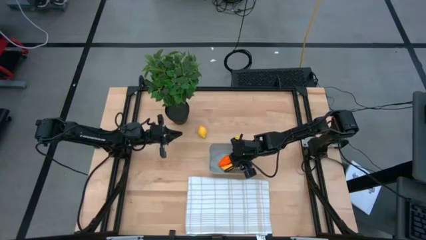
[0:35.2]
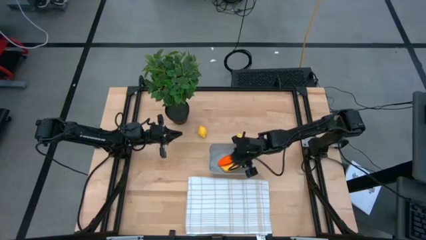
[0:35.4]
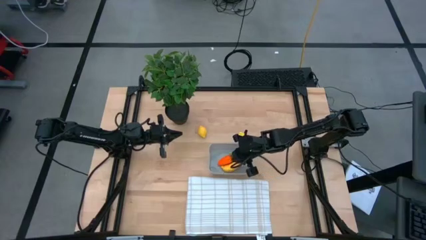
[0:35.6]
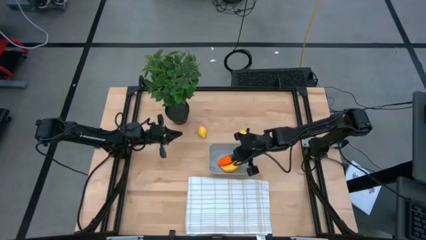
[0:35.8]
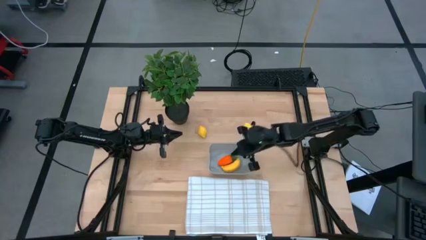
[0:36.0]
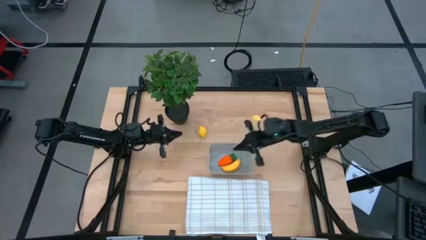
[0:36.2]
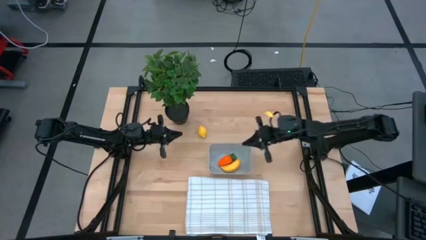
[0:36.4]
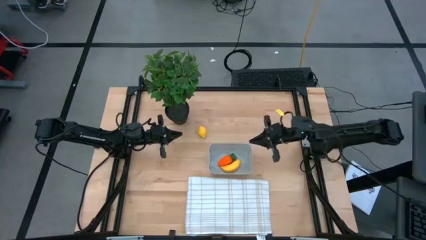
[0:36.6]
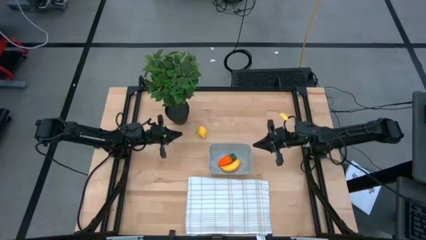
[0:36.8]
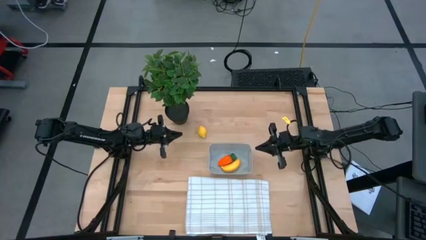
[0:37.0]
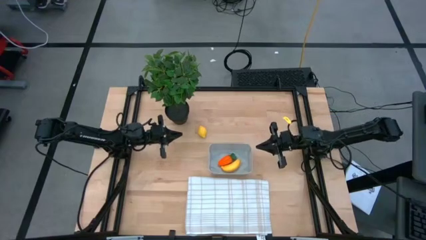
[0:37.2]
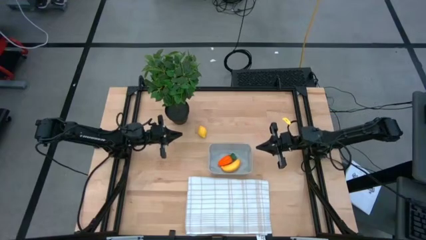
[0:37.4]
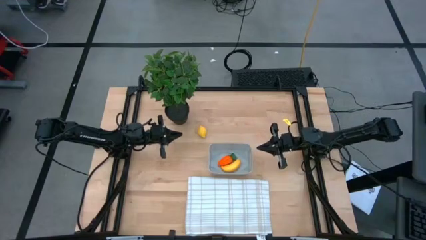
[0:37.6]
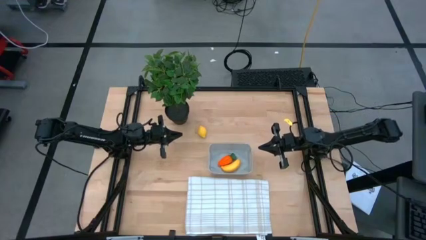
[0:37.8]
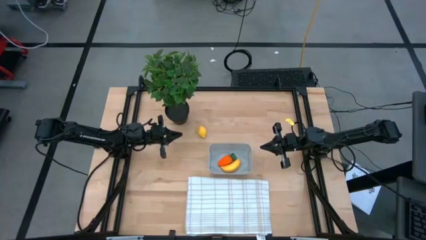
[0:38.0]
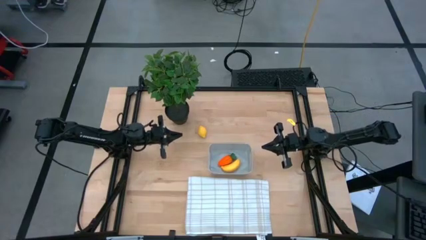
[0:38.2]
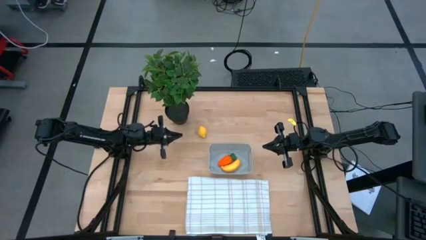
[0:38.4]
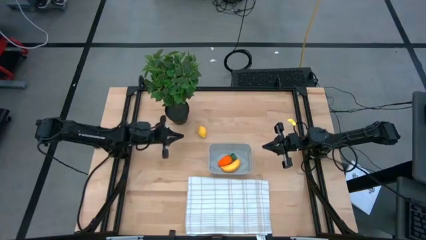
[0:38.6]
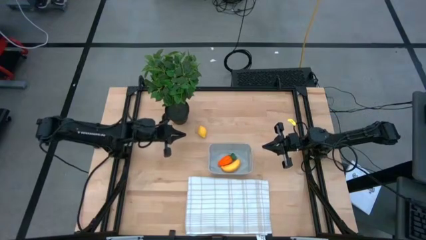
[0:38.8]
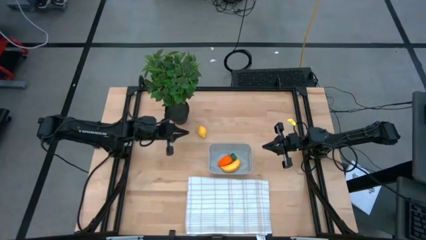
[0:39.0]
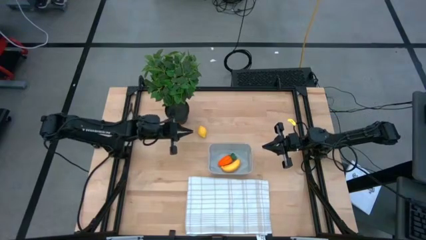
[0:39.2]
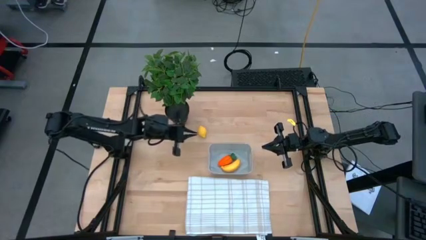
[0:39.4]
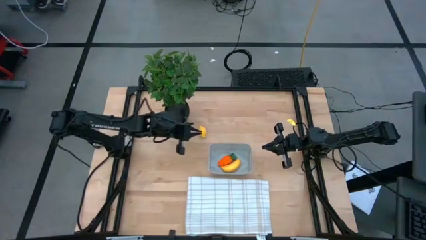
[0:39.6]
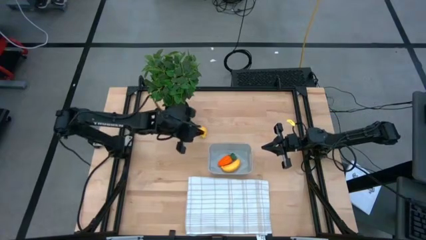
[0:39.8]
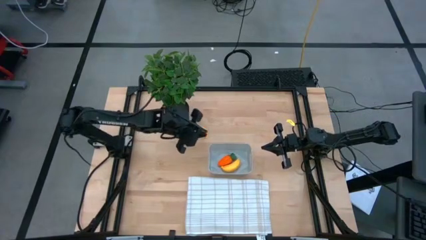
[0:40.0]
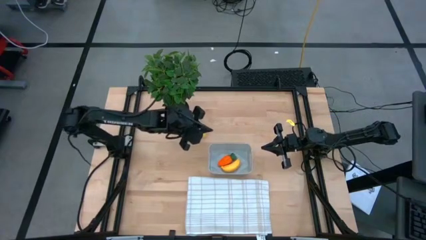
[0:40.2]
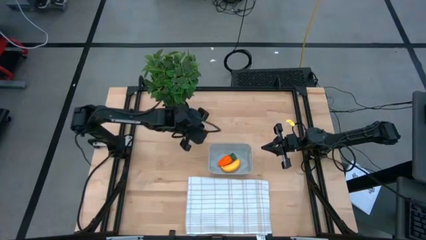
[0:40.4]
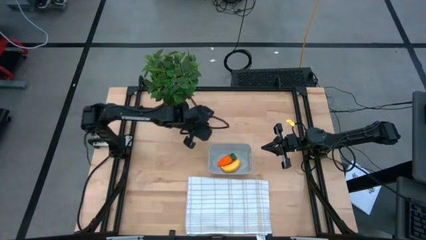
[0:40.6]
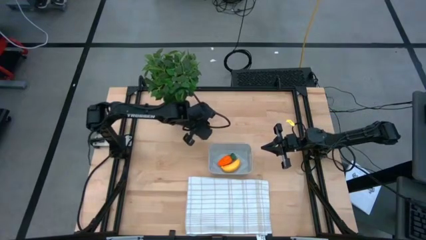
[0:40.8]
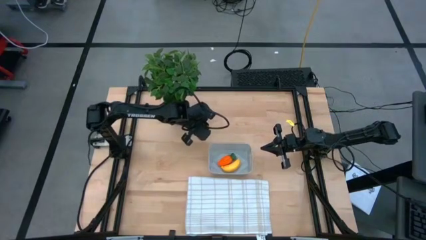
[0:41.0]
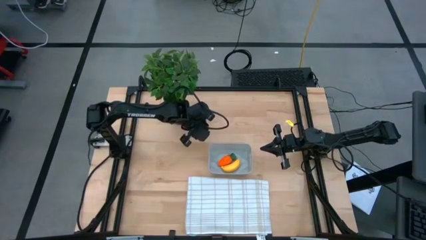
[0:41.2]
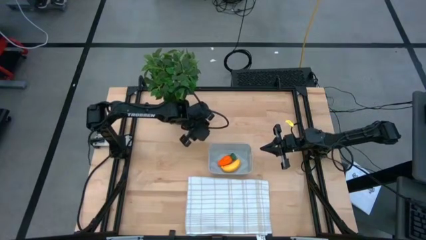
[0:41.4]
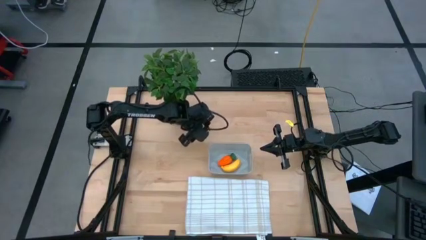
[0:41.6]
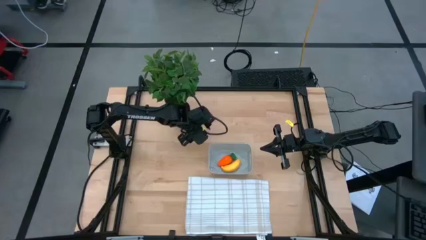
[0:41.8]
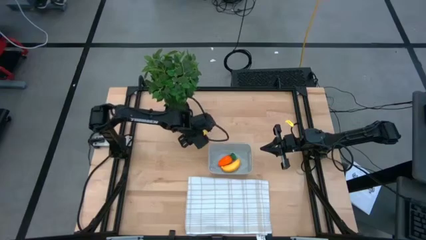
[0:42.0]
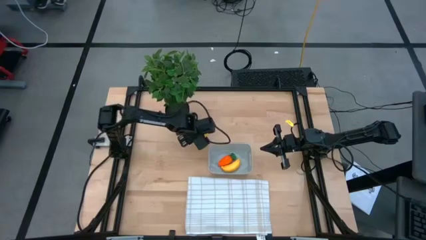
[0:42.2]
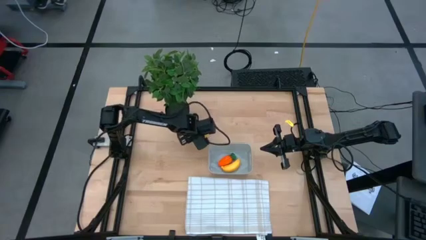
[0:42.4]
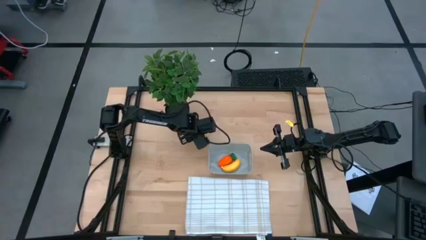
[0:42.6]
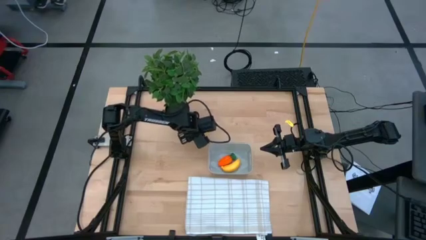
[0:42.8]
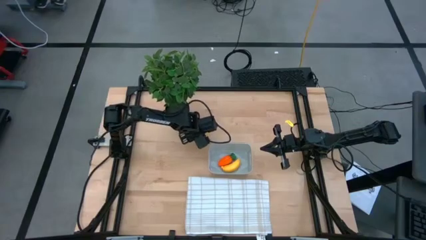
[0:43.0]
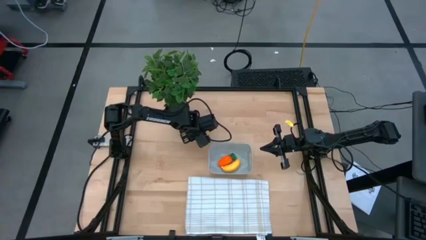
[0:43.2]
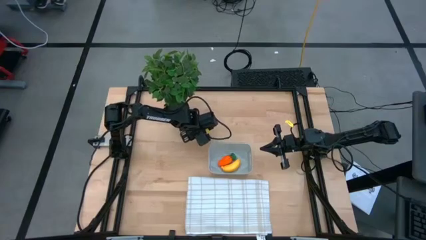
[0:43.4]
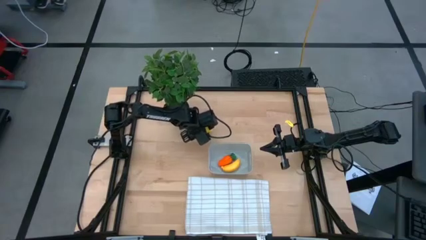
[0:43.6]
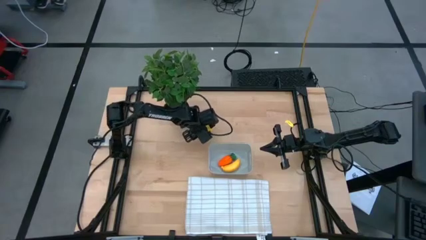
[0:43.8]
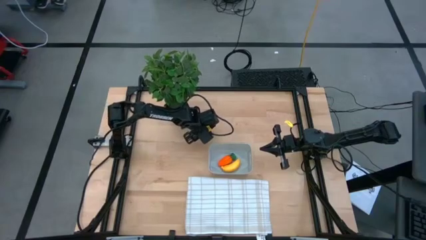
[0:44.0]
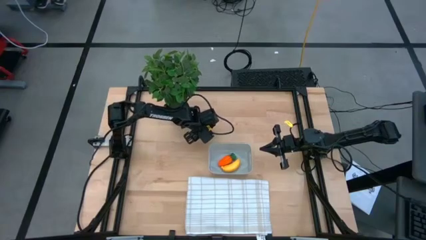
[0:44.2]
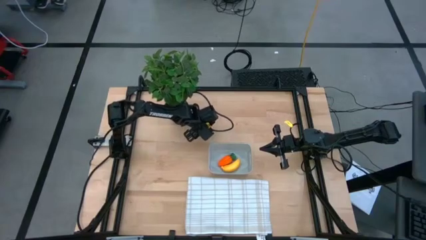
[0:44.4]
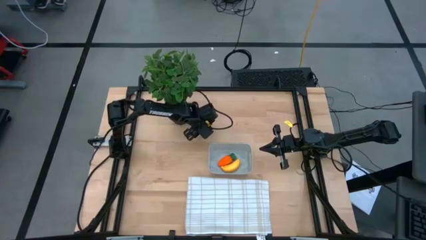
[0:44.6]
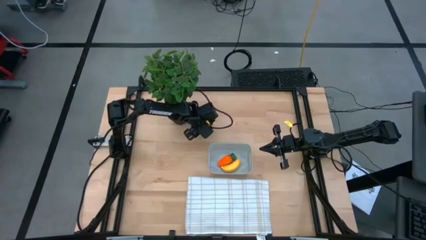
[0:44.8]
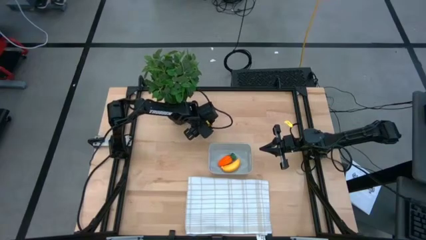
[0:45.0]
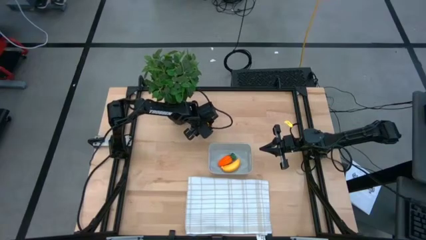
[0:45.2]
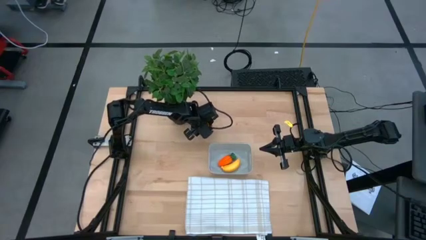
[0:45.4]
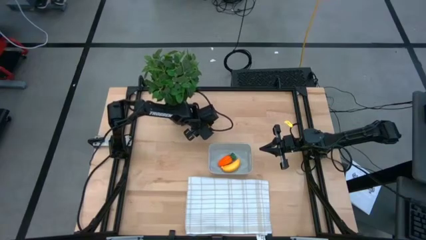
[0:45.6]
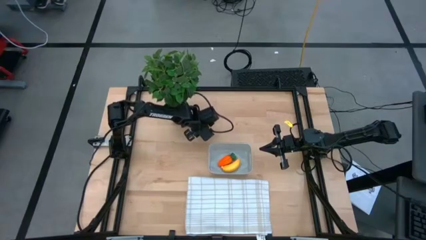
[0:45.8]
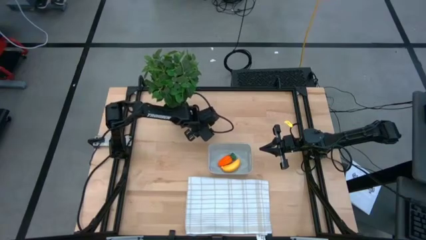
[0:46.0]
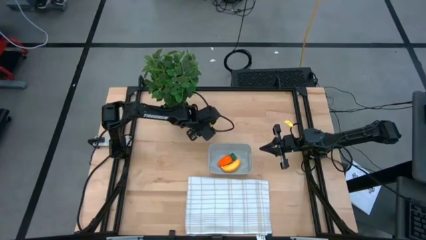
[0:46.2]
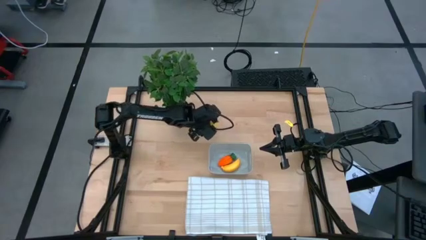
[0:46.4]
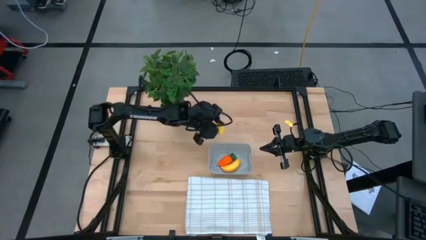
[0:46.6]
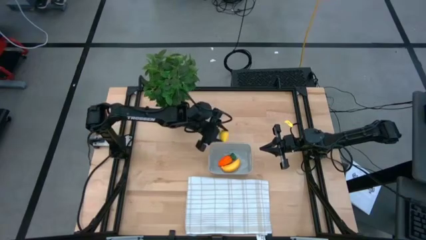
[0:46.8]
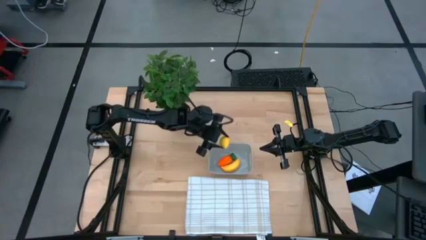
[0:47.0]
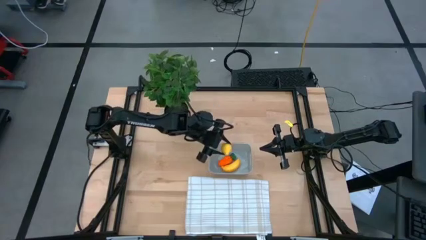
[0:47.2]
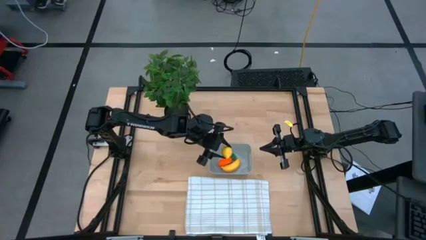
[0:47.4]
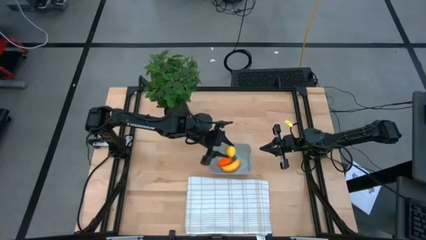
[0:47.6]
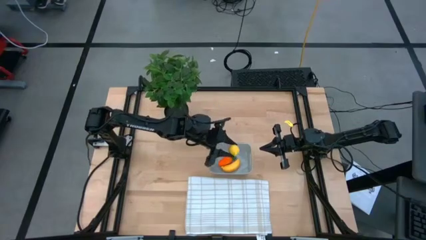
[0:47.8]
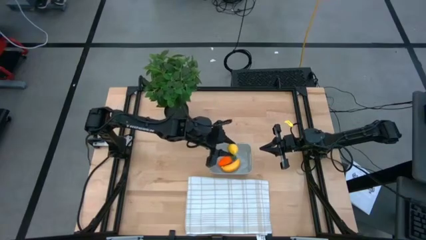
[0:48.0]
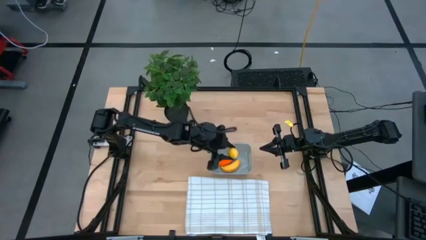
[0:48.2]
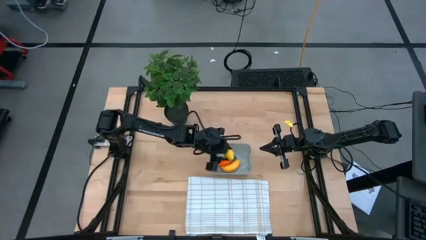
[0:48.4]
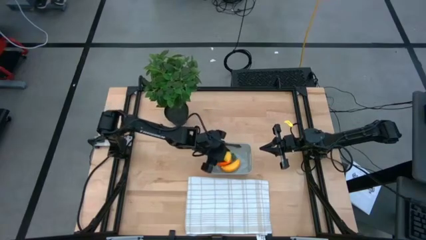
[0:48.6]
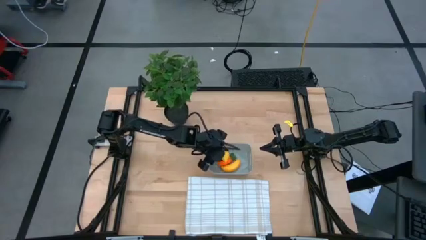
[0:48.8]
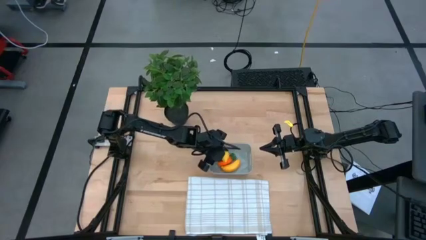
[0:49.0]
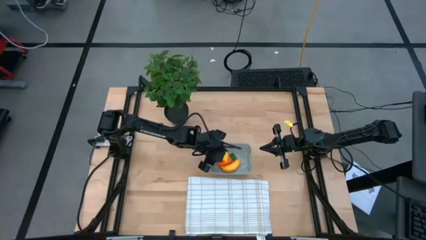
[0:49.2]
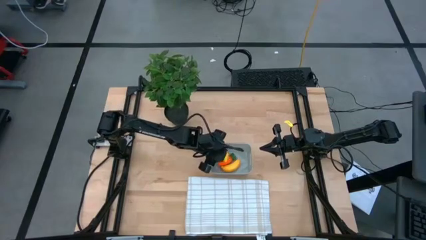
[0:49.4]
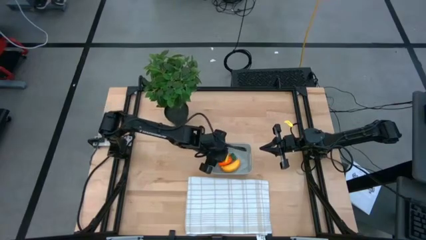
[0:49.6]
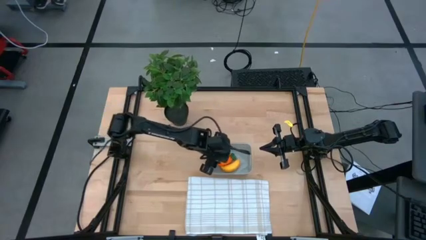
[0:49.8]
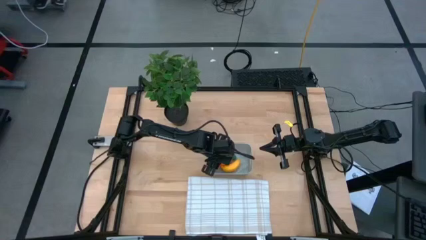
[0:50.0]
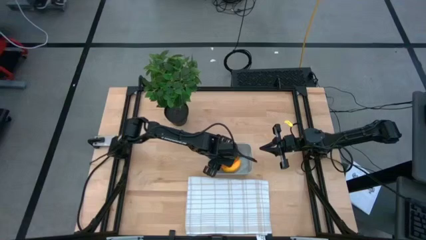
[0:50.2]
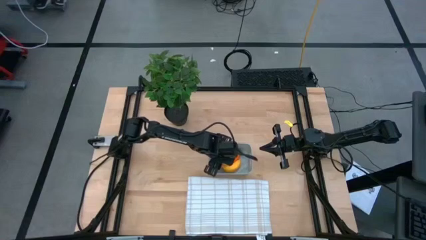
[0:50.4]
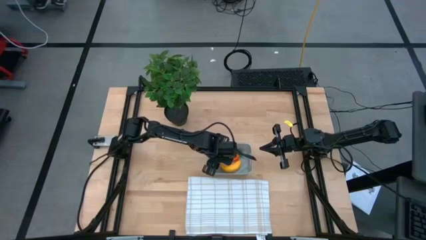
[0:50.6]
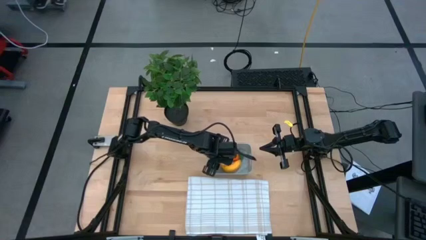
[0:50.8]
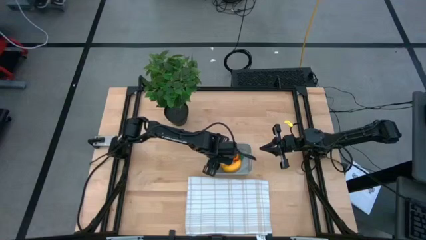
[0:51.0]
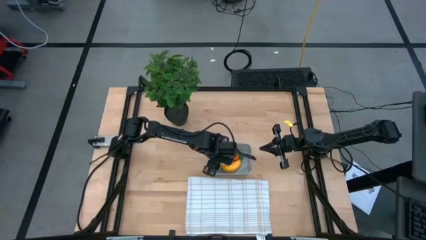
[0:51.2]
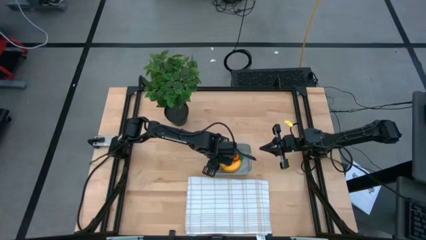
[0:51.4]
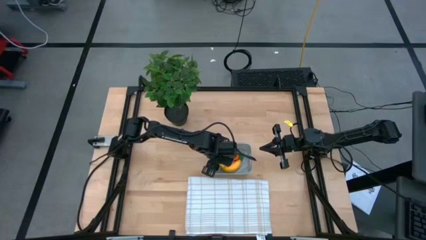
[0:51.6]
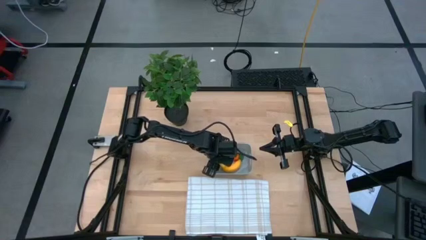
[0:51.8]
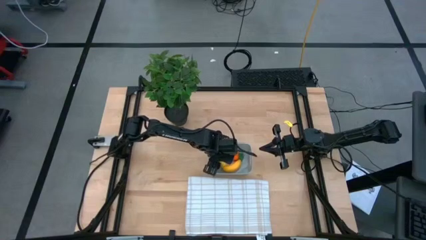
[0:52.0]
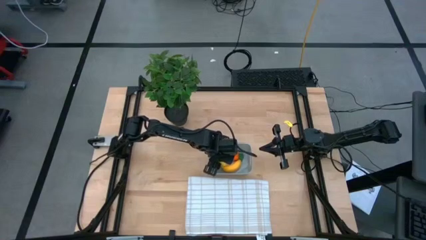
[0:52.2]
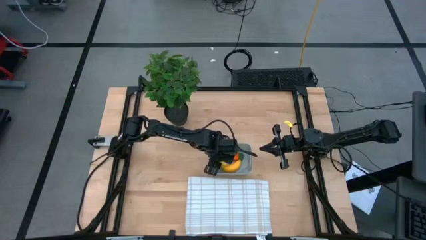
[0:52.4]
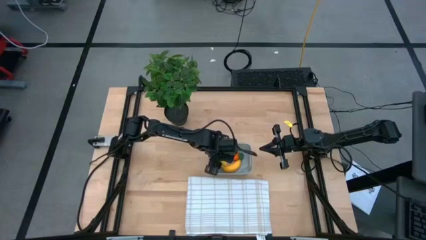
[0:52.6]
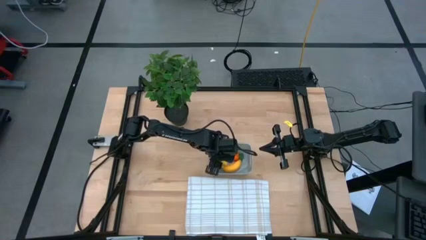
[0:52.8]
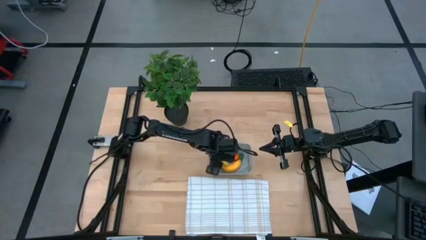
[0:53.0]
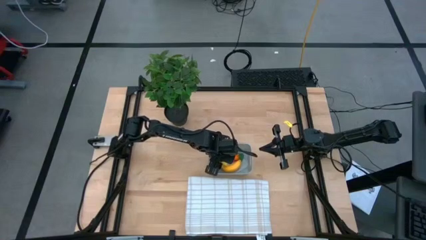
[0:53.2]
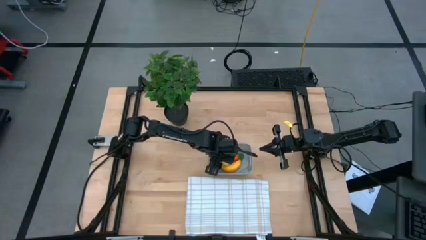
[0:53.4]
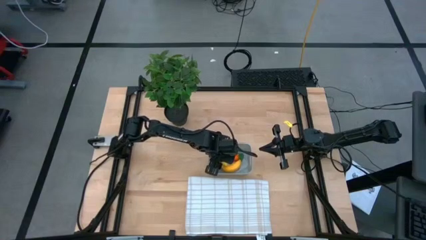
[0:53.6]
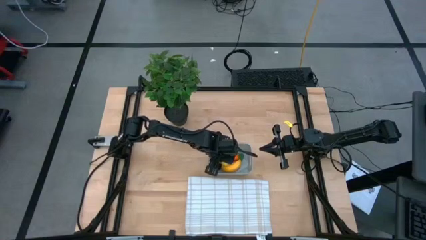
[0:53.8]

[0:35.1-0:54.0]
Task: Pick and placing Produce into tupperware
Put the lemon into the gray bin
